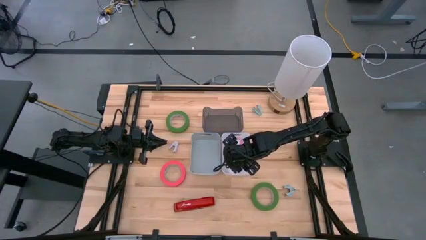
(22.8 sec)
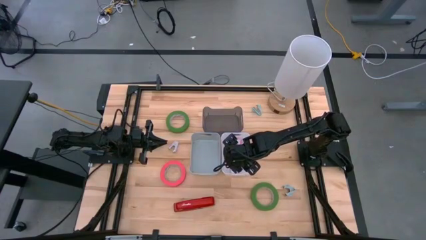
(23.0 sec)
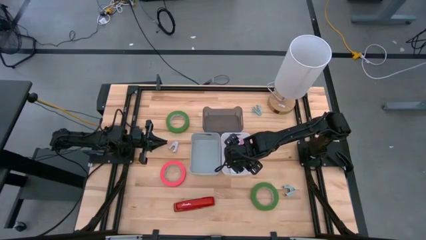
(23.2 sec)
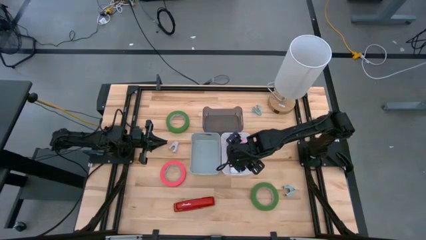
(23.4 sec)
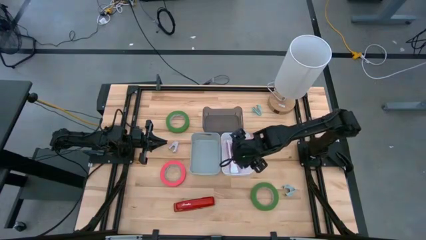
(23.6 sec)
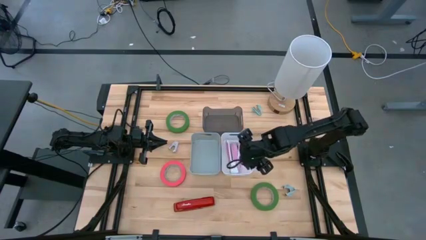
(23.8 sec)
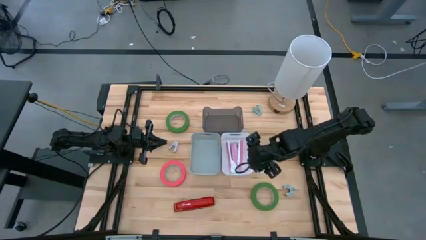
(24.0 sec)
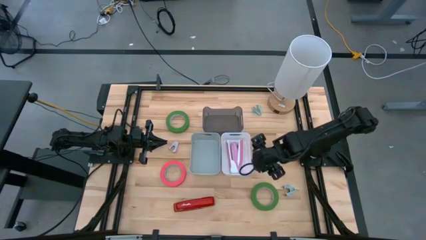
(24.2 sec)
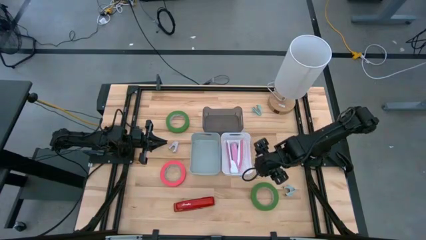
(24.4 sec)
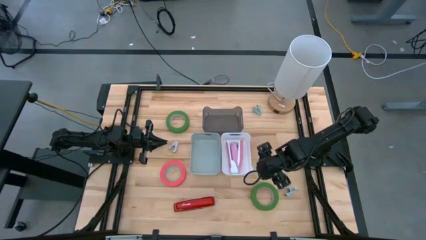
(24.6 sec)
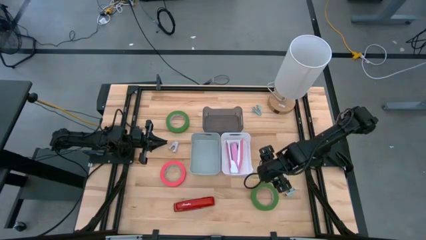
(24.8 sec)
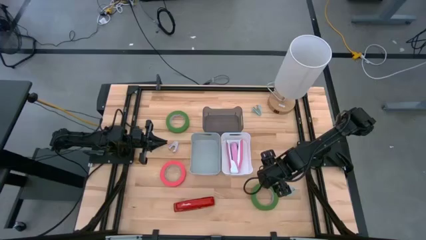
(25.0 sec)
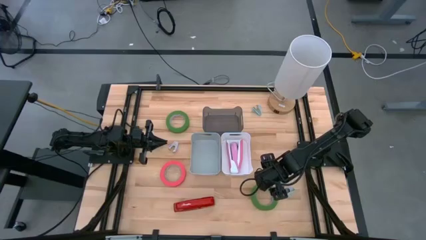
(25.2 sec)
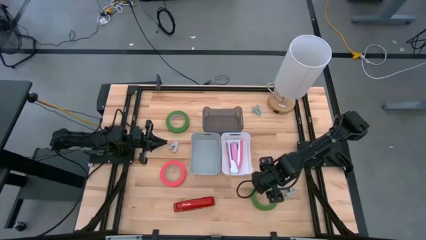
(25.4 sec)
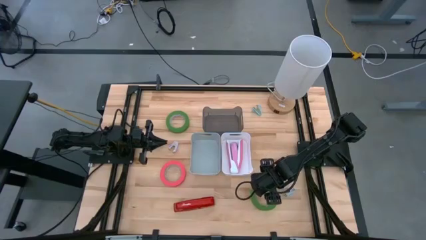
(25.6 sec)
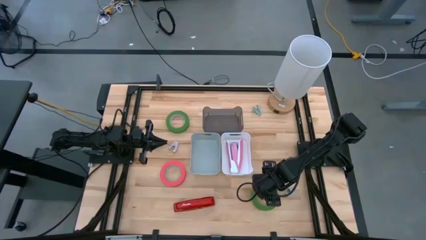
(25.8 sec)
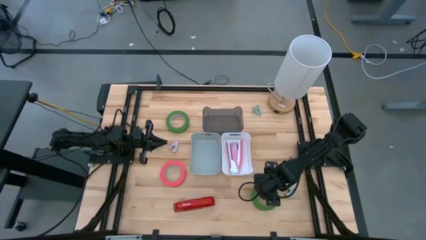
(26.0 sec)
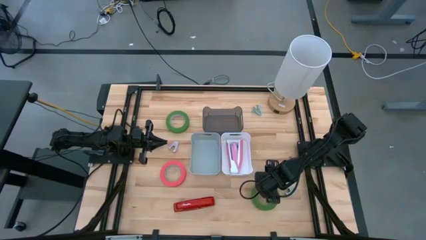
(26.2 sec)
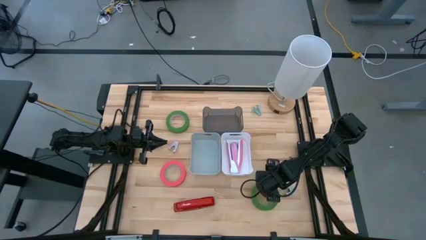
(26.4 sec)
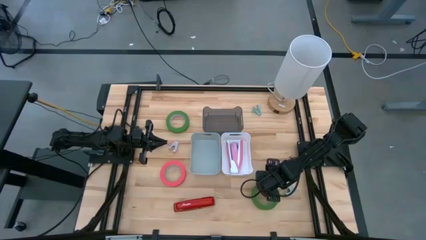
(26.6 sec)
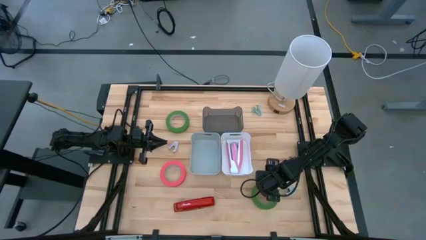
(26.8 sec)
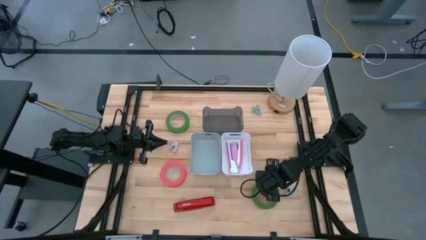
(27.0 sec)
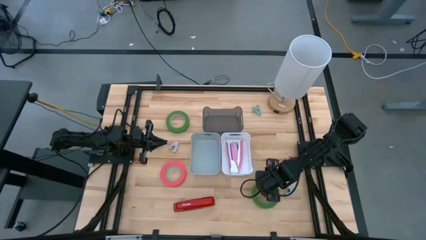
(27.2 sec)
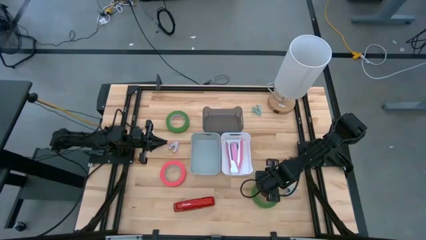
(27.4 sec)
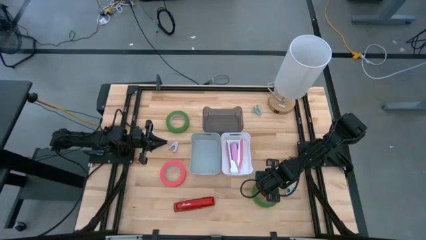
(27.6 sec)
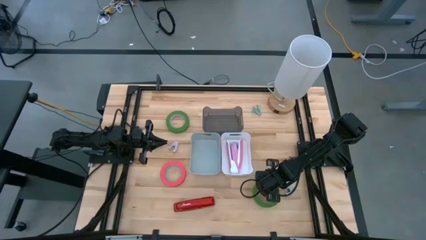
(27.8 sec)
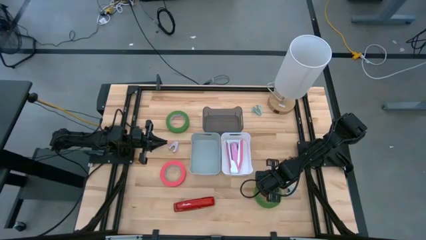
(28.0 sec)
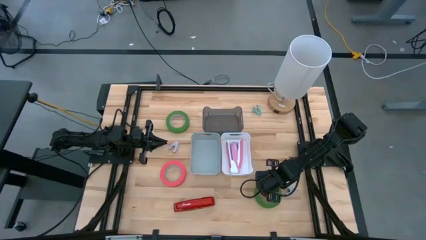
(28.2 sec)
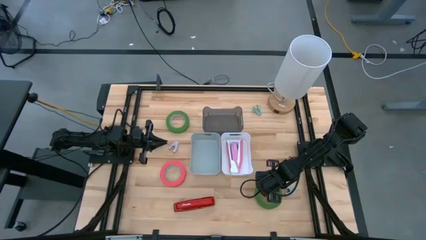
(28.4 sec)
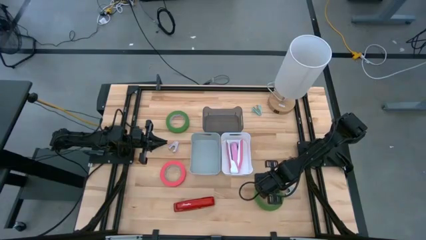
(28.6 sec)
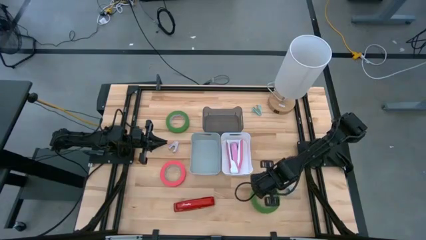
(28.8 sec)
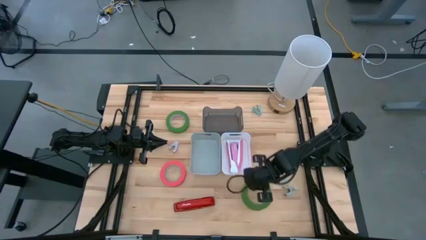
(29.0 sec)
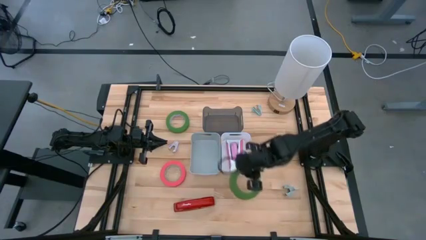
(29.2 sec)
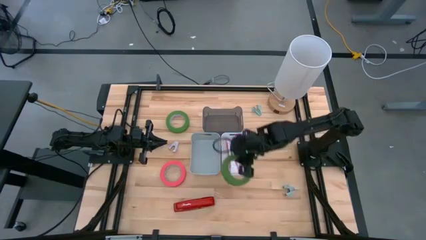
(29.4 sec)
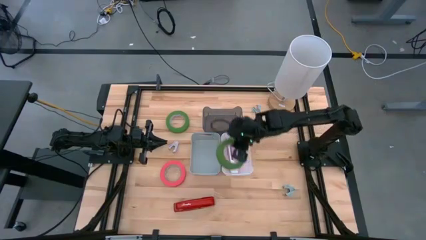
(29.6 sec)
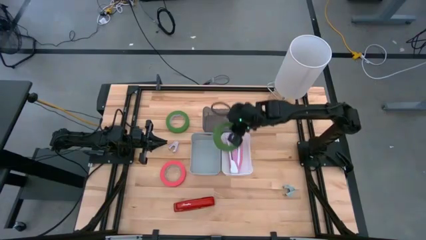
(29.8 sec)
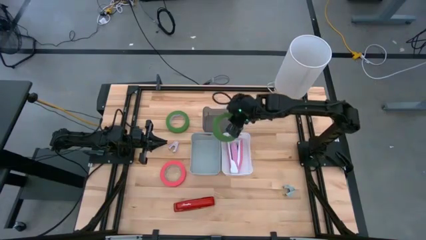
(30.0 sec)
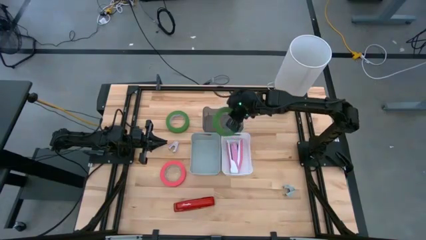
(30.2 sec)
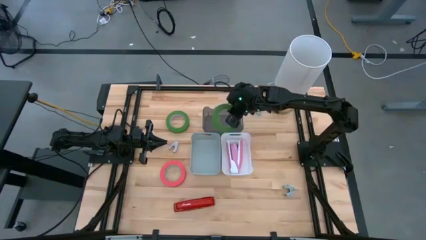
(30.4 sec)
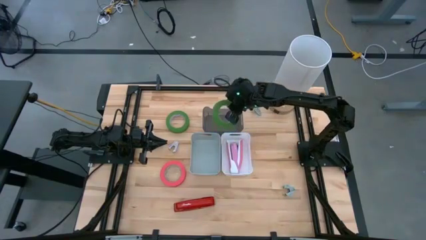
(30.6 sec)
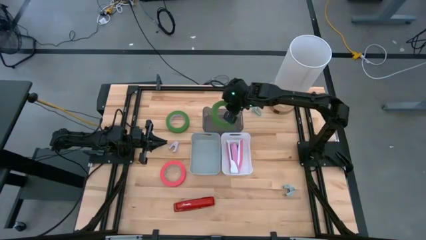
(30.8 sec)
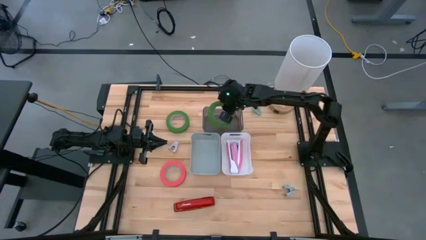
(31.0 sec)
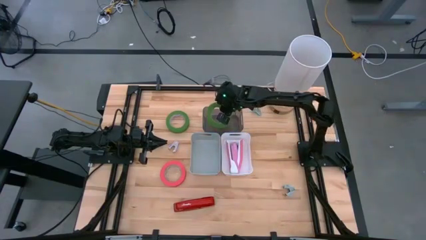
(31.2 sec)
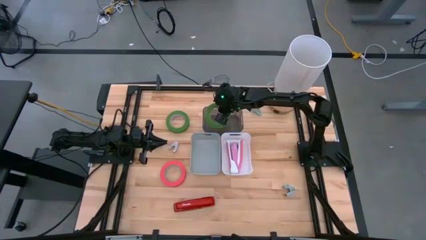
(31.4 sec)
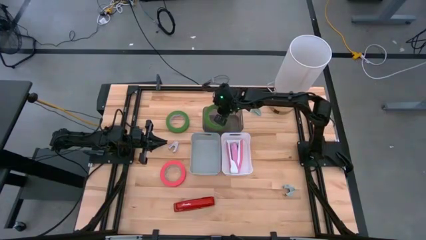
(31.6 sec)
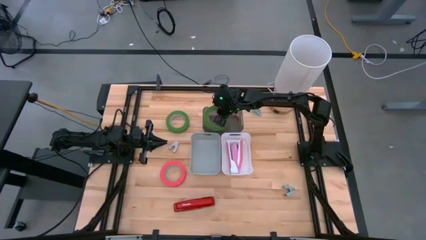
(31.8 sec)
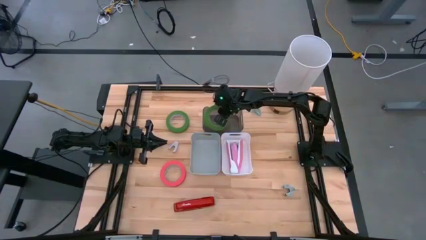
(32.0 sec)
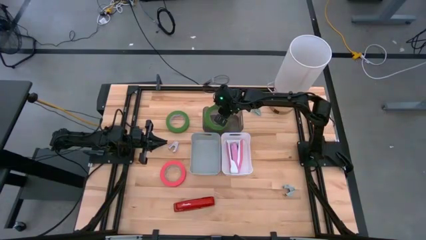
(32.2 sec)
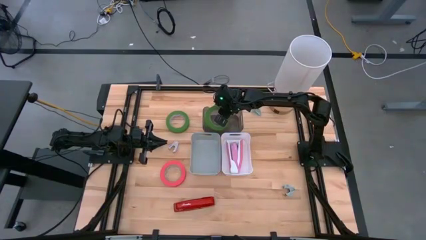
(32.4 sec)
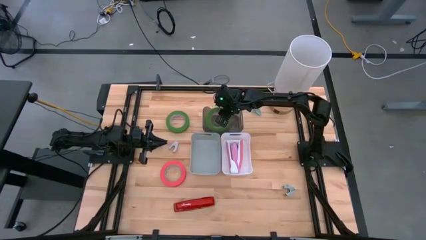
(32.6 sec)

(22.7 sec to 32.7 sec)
Task: Pick and place Stapler, Stapler remover, tape
Put the bottom green tape in the black bin
